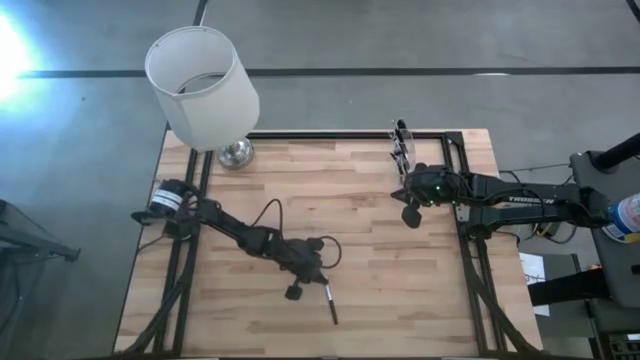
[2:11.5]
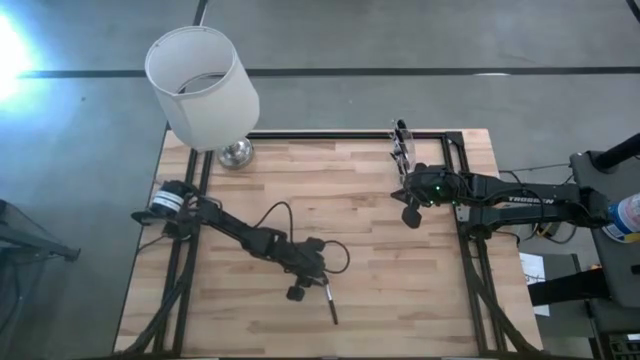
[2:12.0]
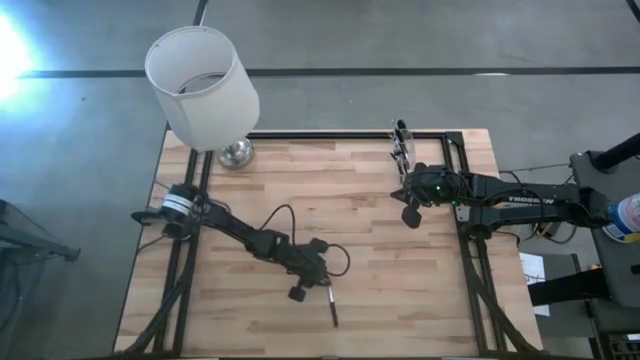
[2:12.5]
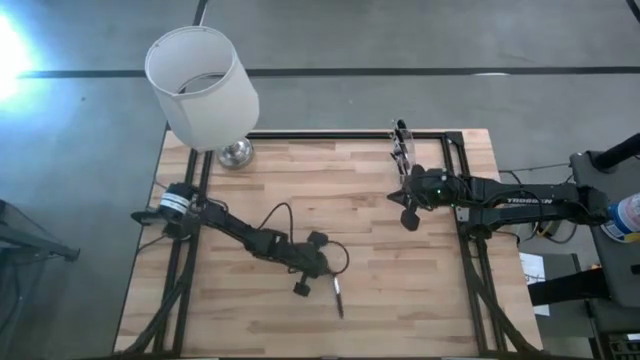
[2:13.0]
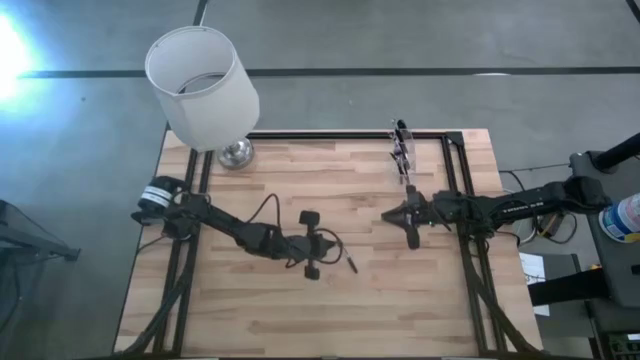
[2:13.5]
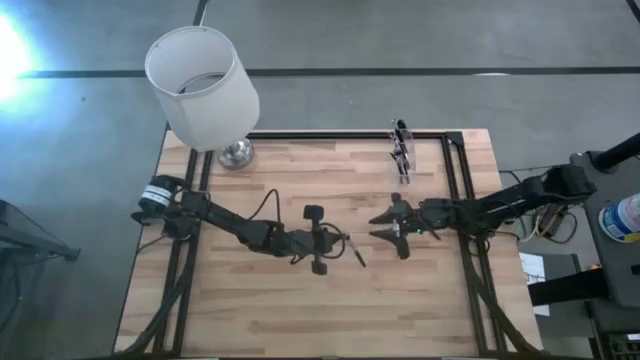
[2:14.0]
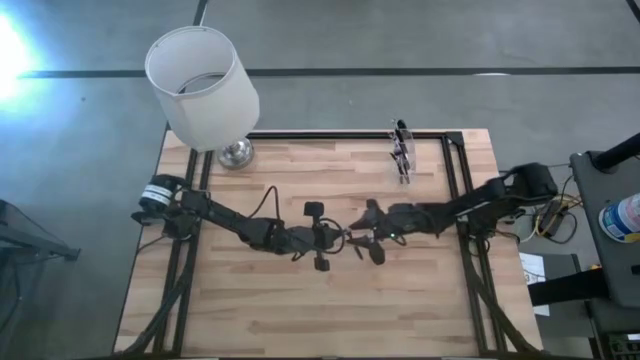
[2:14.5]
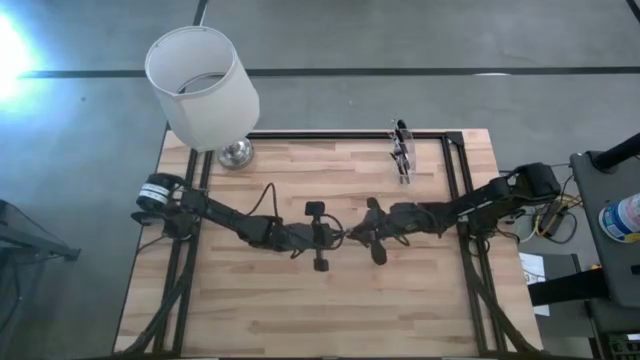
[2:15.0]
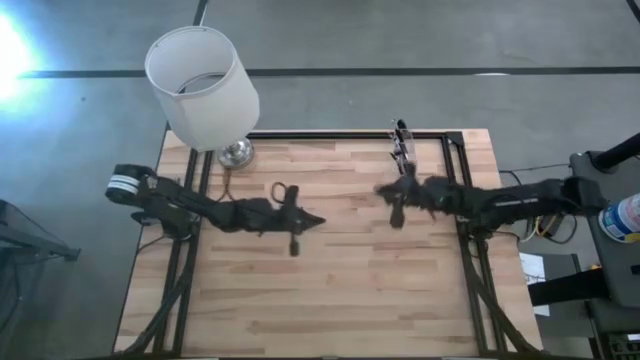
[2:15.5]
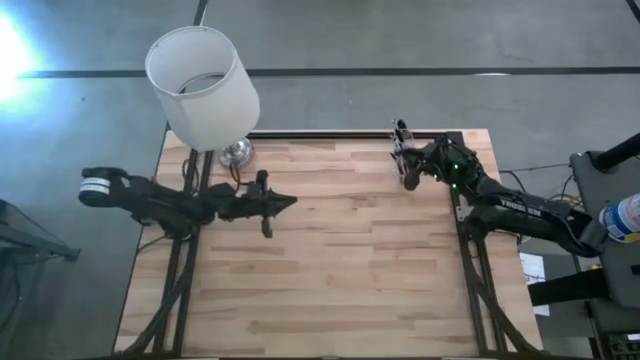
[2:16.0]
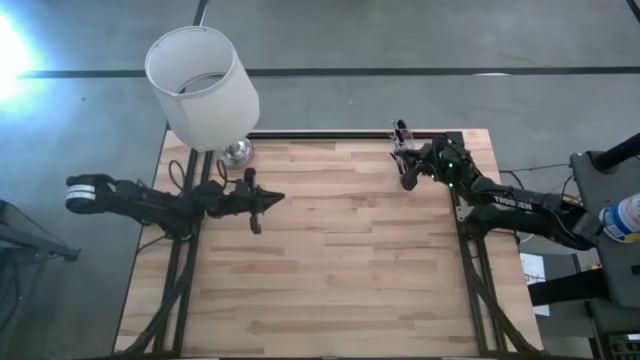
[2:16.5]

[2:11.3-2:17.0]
Task: Put items in baskets/containers
Put the powder brush into the transparent organizer

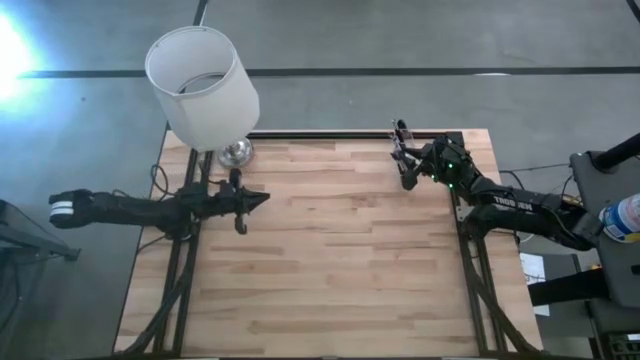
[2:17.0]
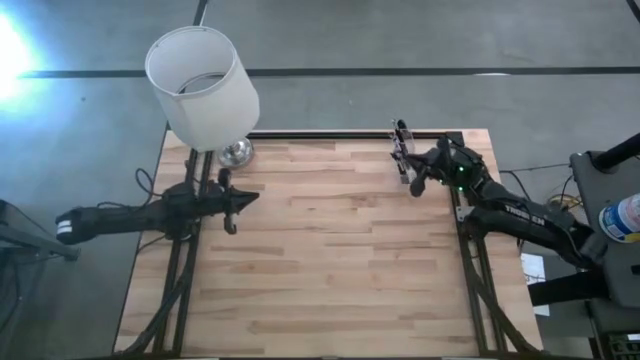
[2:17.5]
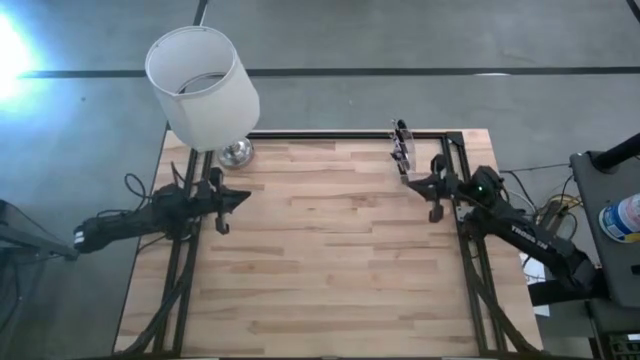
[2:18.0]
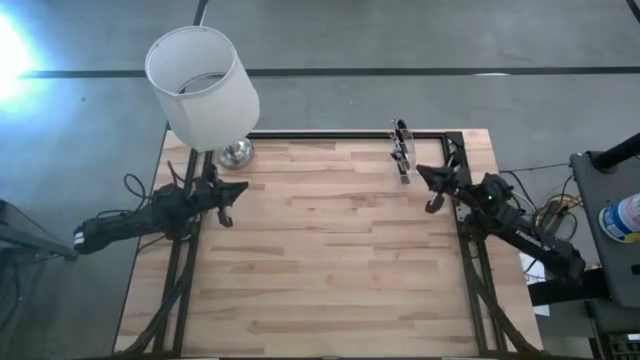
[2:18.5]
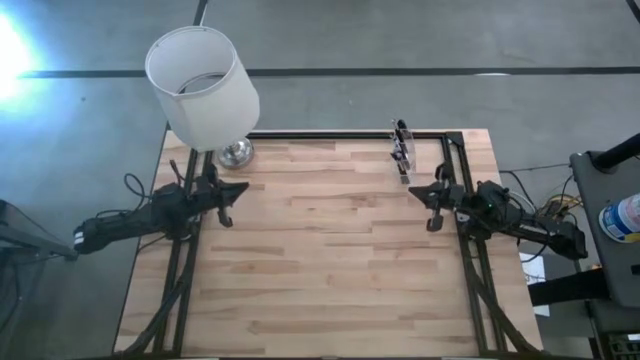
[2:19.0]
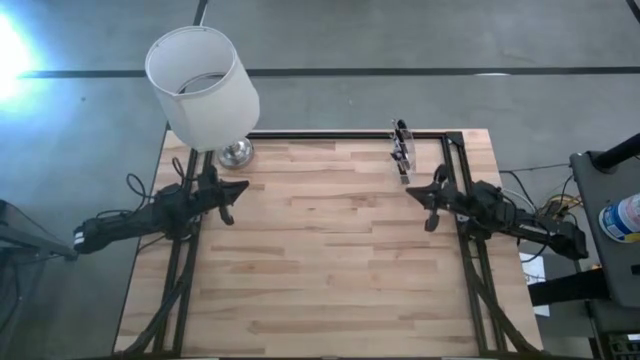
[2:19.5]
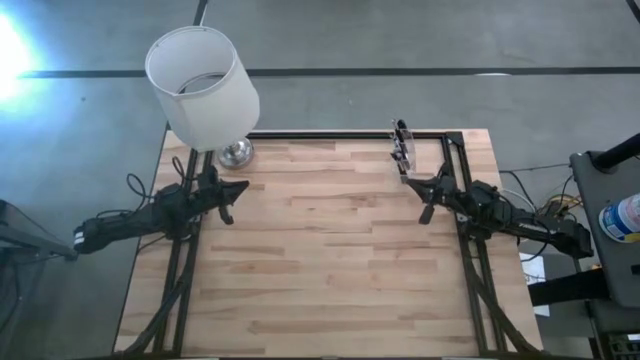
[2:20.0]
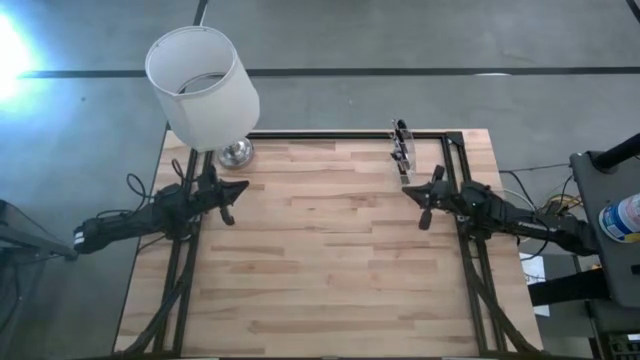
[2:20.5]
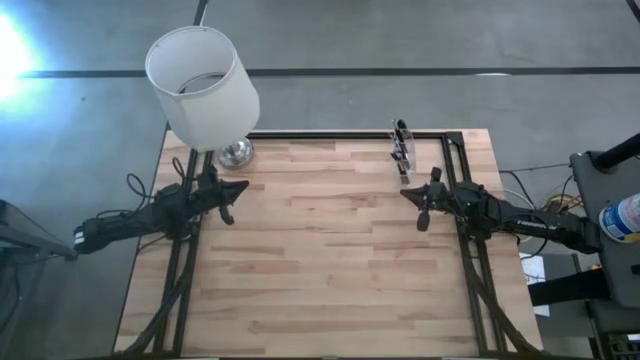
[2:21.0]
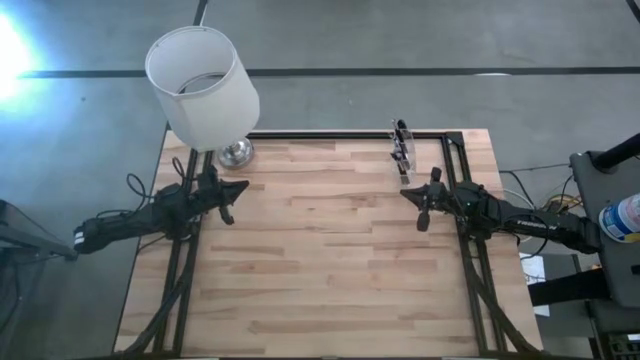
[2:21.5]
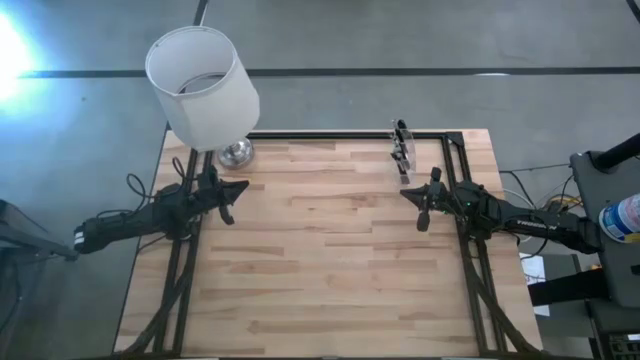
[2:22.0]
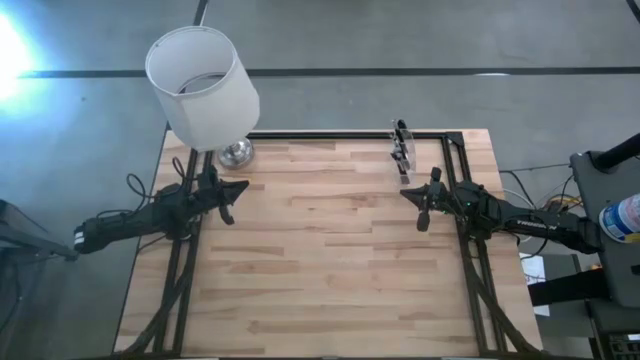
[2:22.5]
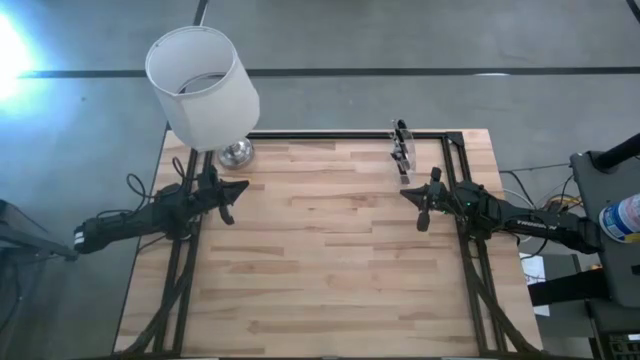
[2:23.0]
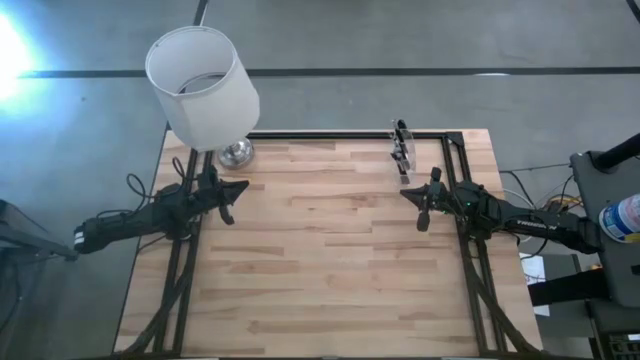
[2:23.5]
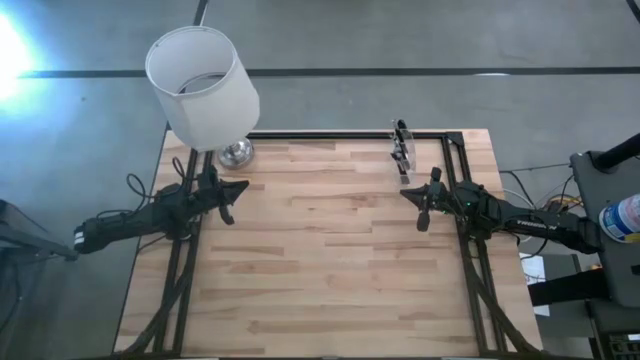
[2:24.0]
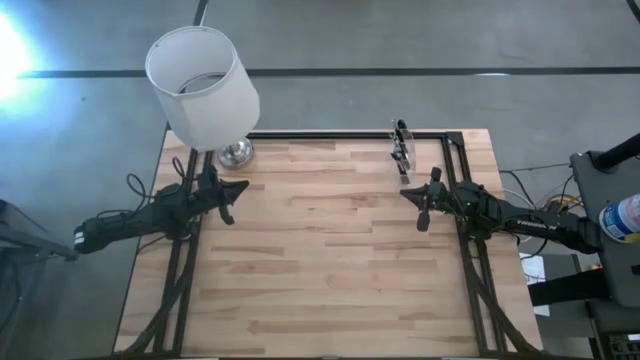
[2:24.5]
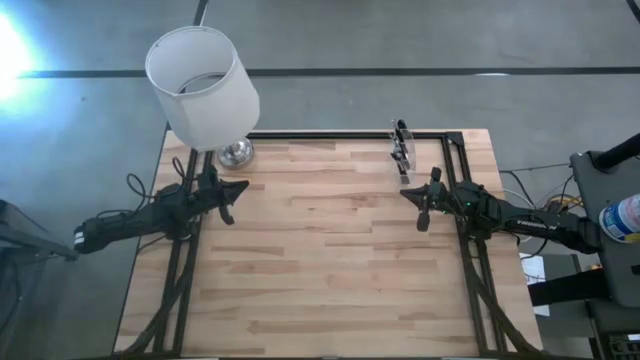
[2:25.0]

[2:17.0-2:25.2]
Return to Home Position

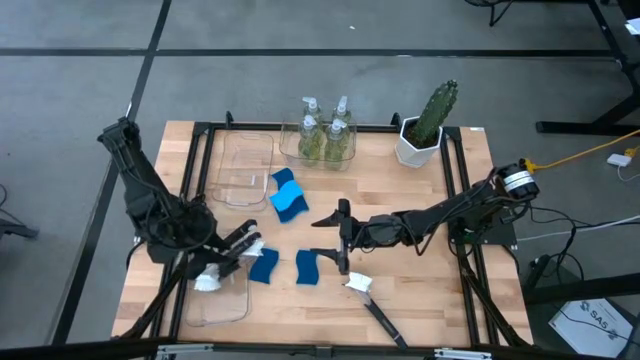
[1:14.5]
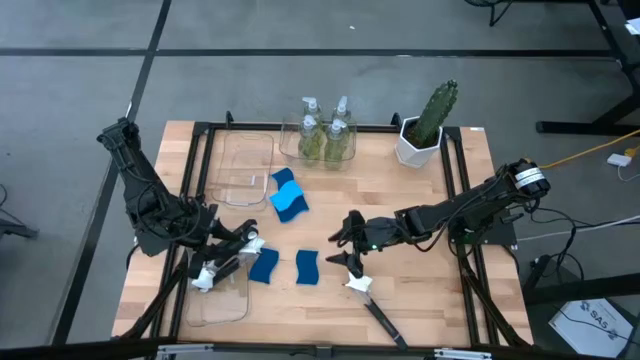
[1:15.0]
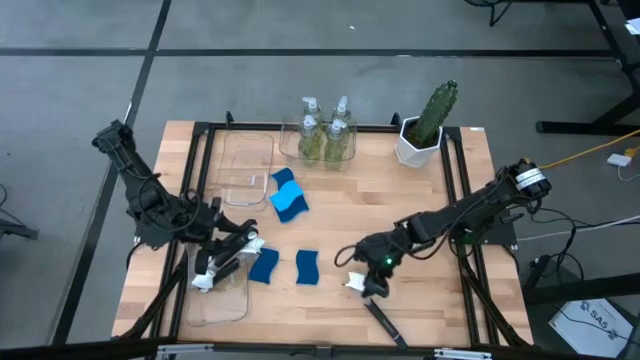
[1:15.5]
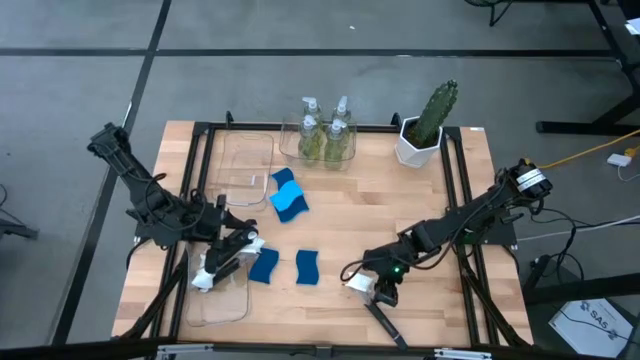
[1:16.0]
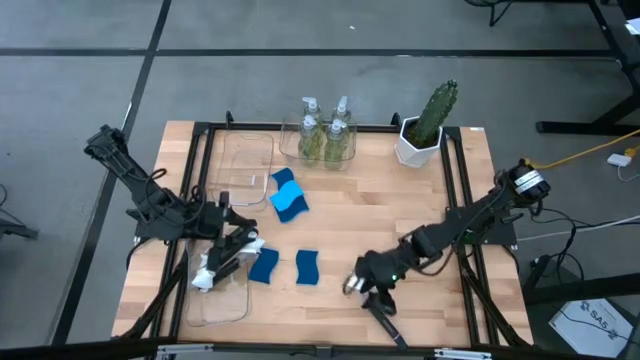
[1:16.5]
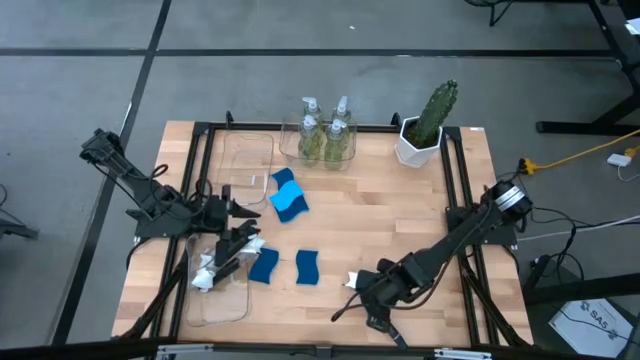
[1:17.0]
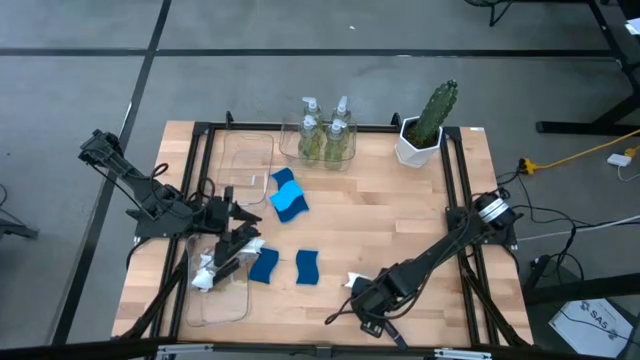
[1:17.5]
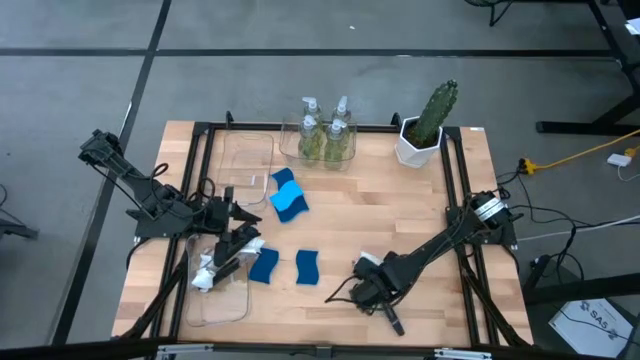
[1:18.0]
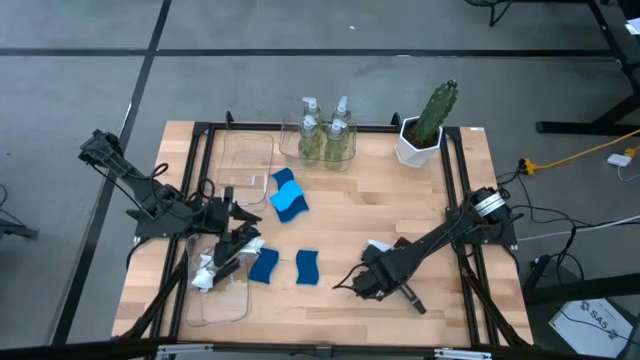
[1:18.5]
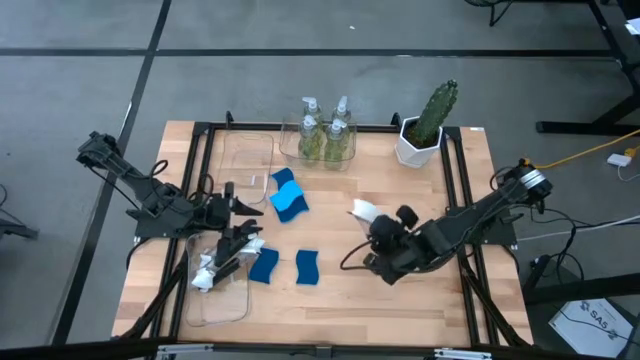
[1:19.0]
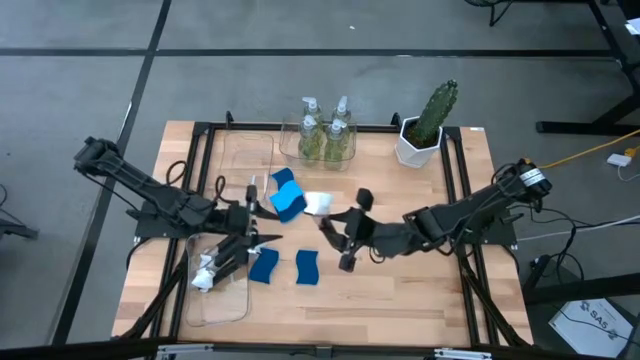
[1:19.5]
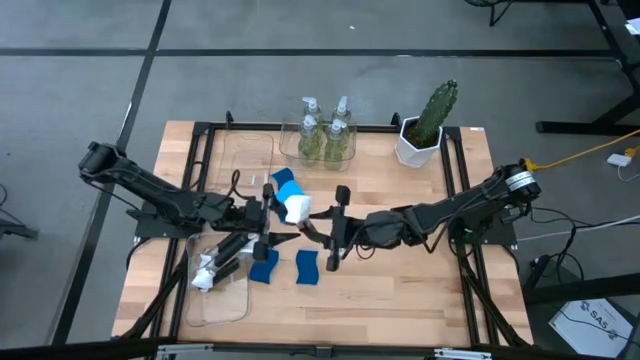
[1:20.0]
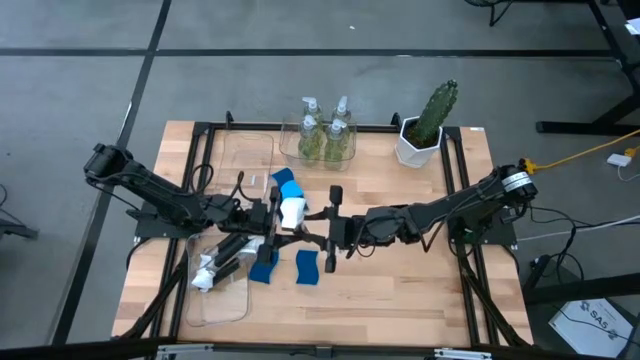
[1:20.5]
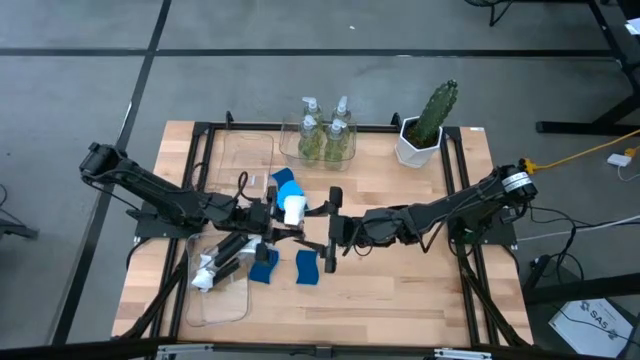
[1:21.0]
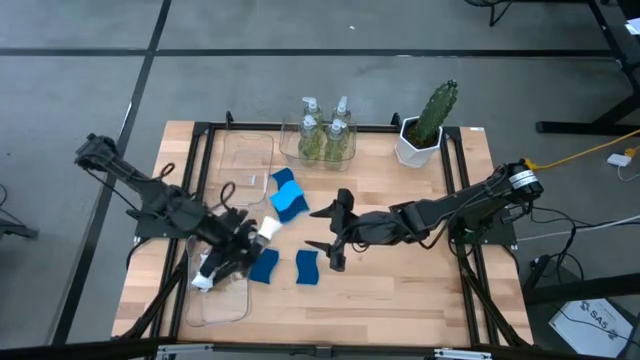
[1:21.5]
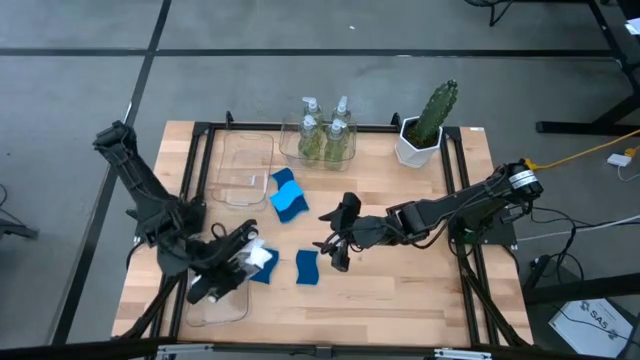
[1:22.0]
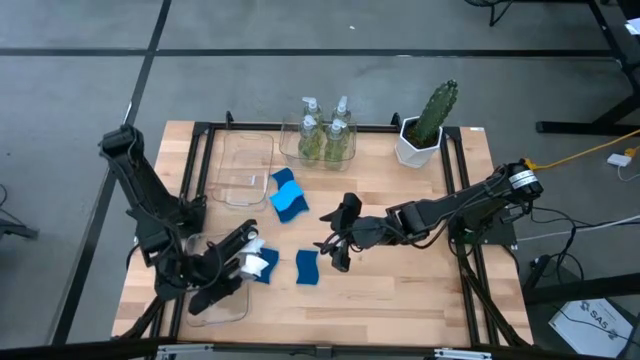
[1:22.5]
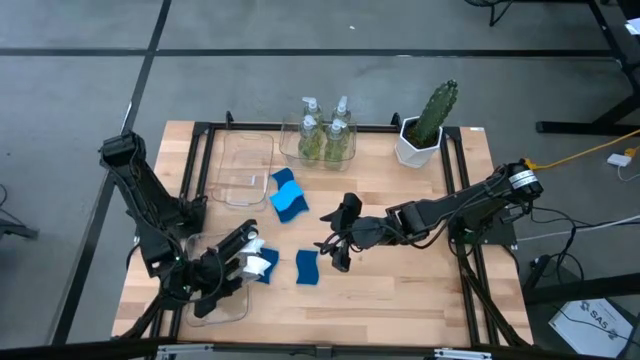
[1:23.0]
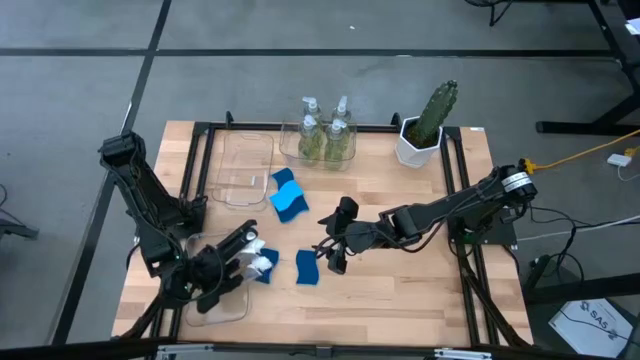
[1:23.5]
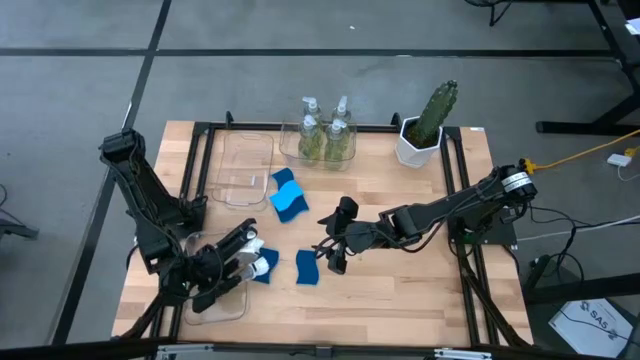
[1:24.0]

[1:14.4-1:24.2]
Task: Pick & Place Kitchen Sink Supplies
Put the black dish brush into the bottom left transparent bin
